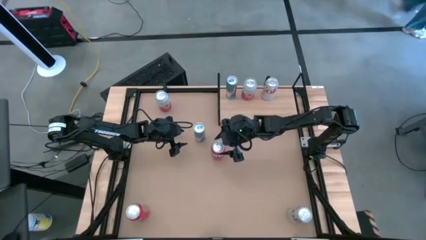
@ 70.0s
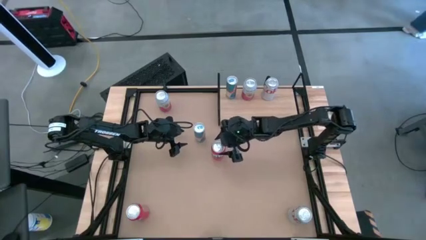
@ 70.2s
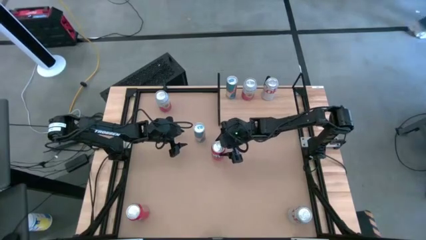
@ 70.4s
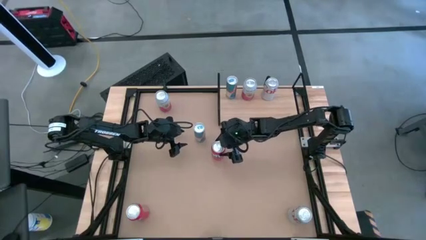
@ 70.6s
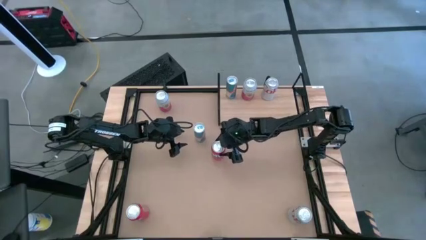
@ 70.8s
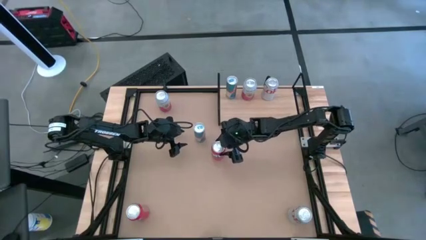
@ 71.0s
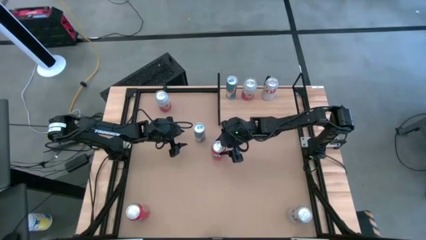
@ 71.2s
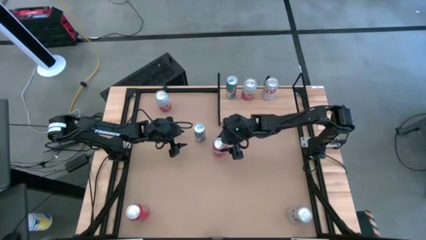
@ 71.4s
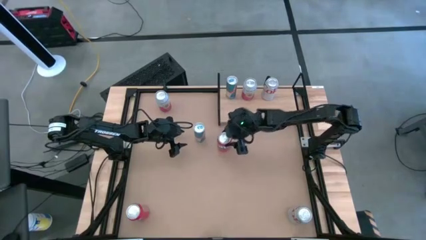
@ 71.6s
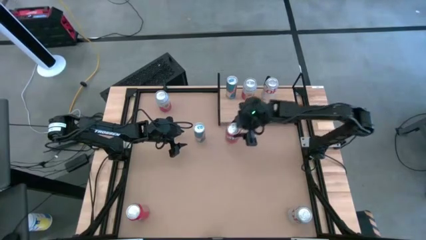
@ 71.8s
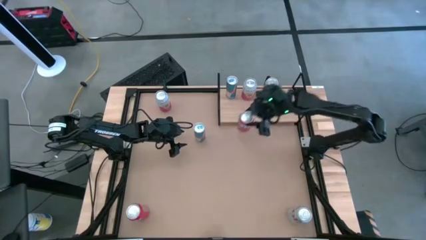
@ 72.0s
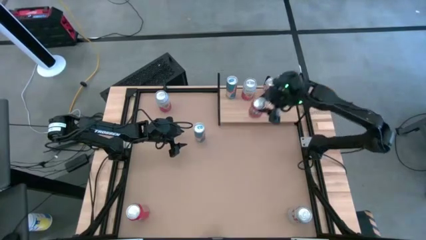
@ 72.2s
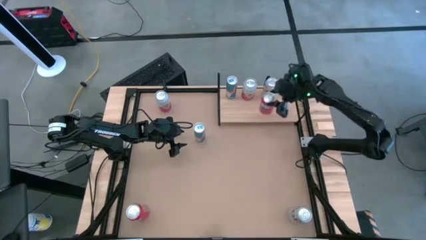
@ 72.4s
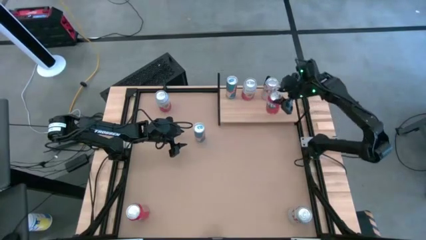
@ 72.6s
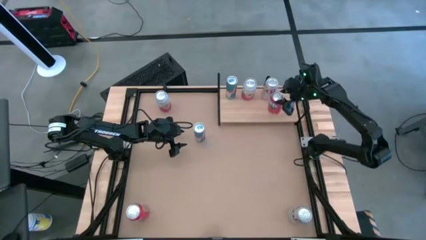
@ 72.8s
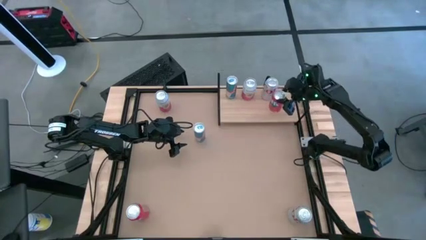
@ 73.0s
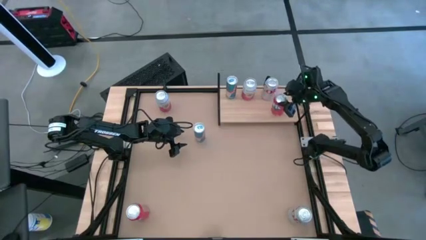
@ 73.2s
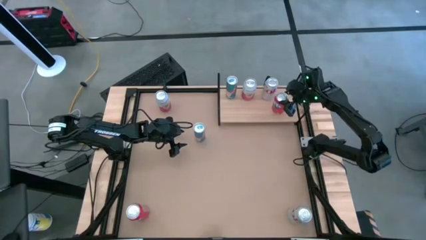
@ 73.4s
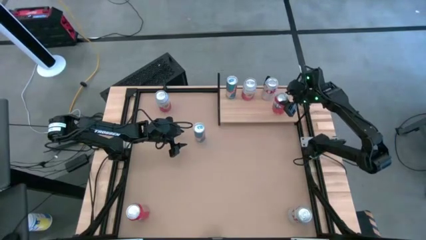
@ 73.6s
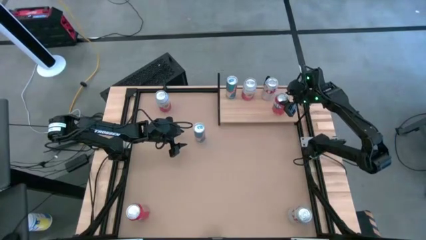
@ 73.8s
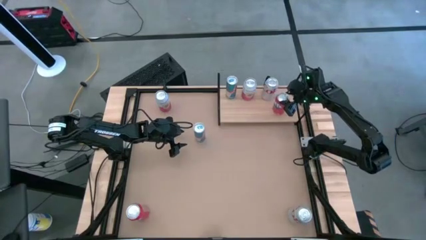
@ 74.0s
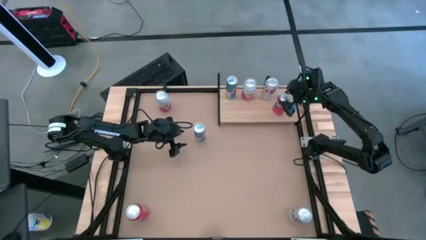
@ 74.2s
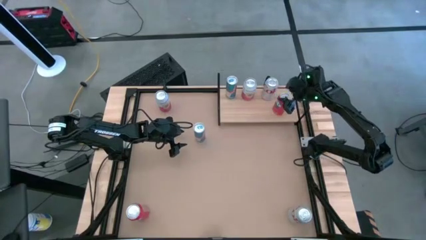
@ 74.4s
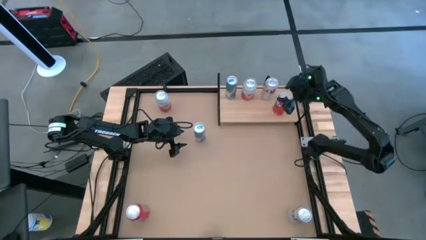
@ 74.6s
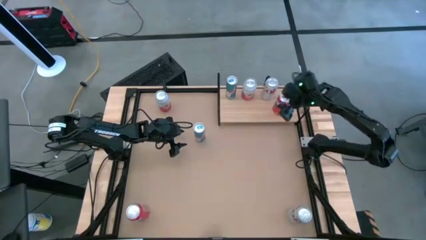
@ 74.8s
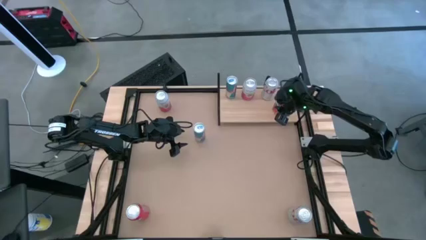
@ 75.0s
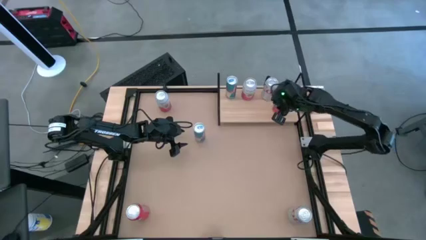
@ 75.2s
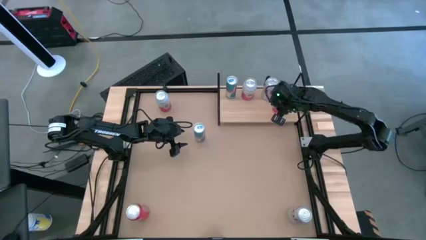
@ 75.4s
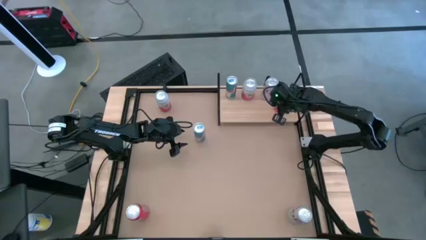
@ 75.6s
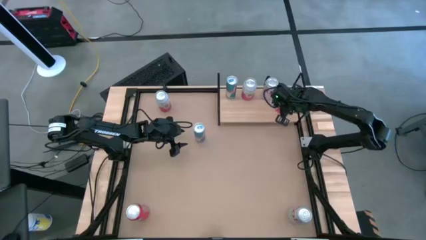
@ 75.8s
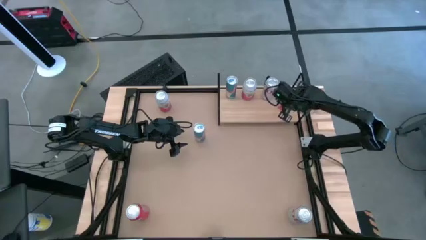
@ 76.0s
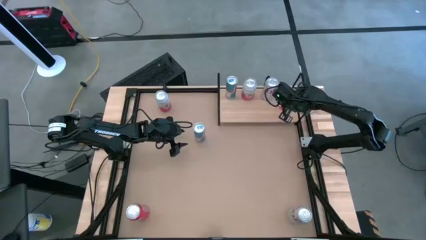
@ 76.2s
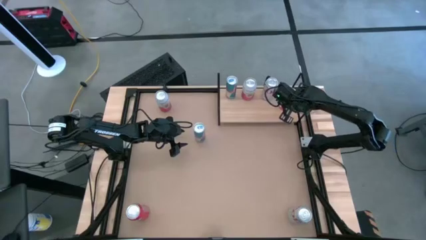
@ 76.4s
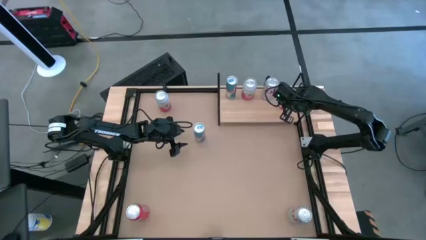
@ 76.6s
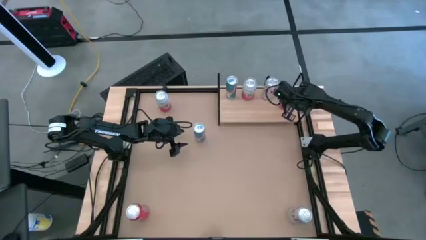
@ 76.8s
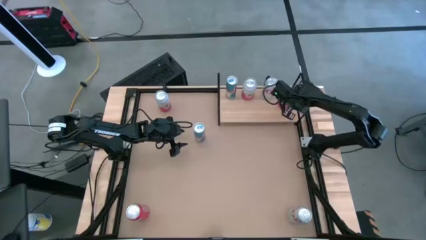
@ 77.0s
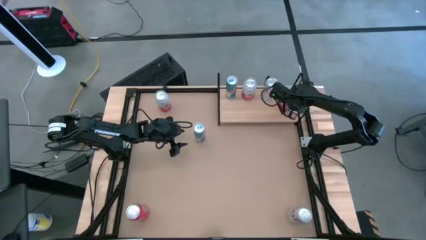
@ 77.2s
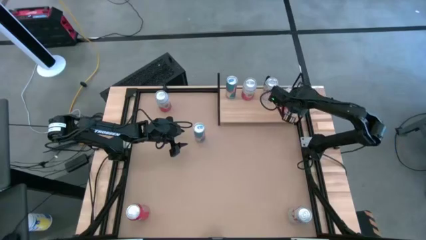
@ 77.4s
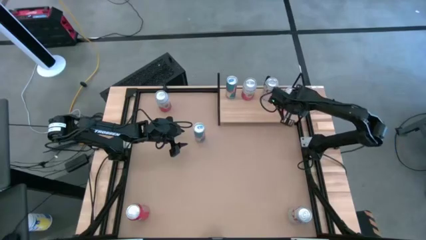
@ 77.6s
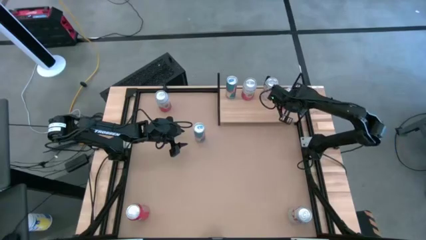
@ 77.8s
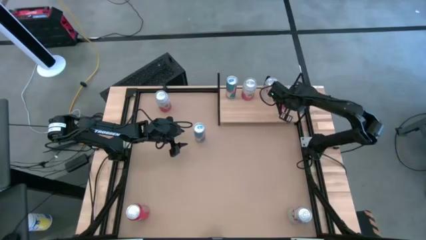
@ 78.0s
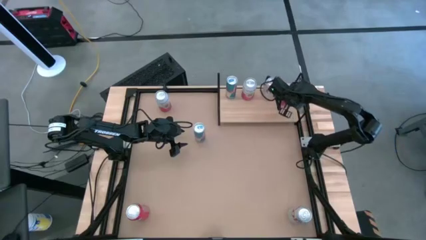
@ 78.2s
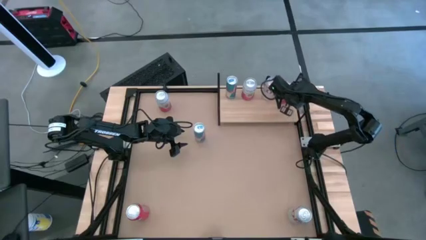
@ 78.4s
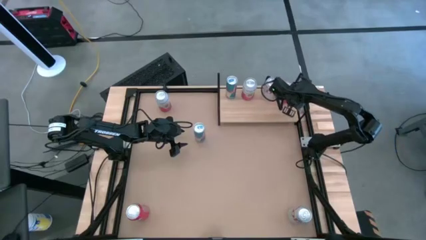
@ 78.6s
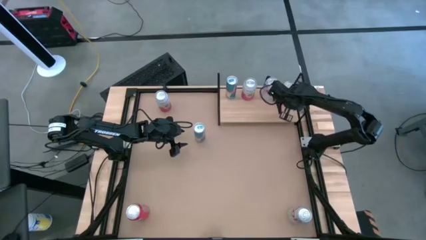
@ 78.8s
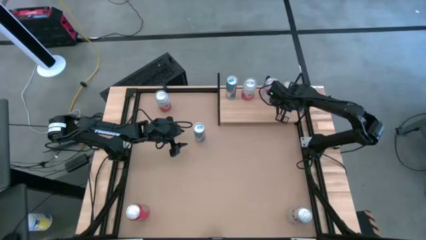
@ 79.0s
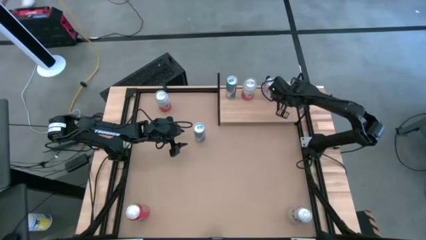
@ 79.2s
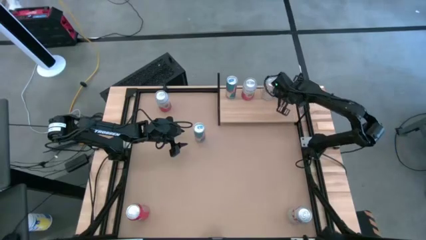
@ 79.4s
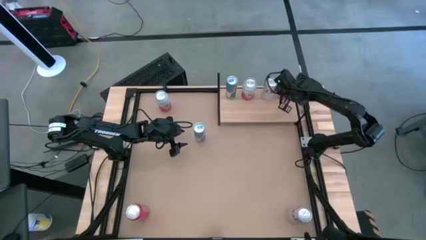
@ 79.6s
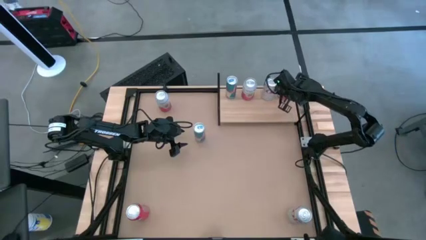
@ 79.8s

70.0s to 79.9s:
Task: Place canned beverage on shelf
Put the top orange soda can on the shelf

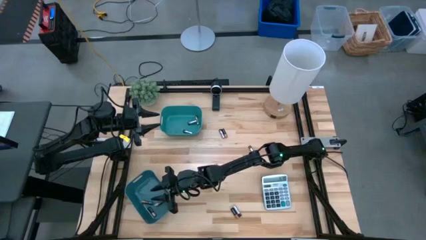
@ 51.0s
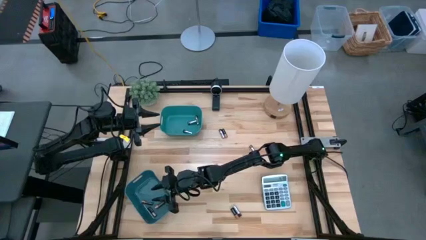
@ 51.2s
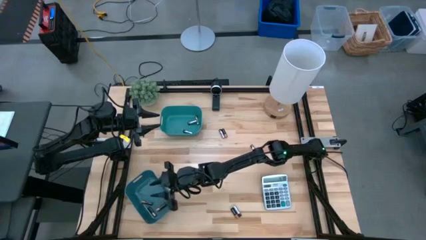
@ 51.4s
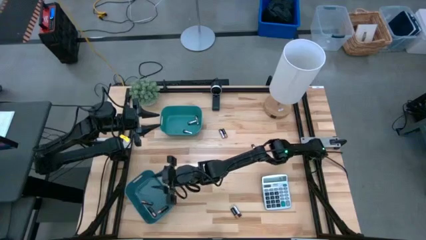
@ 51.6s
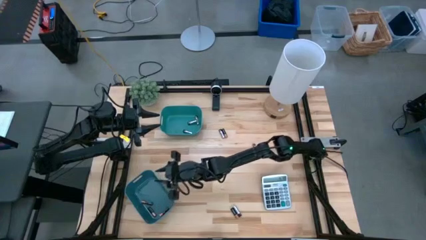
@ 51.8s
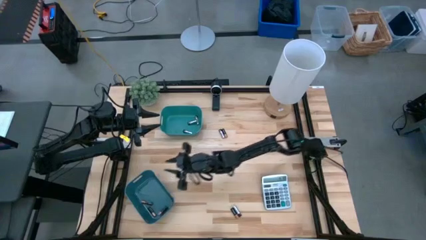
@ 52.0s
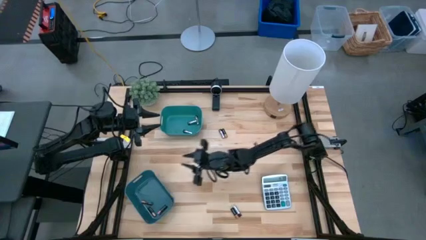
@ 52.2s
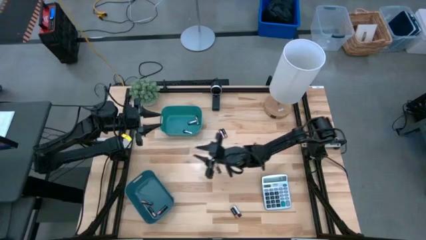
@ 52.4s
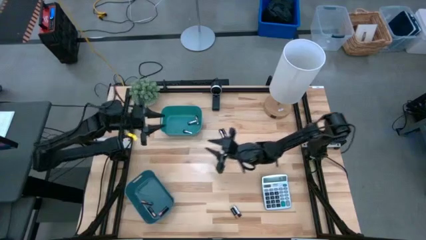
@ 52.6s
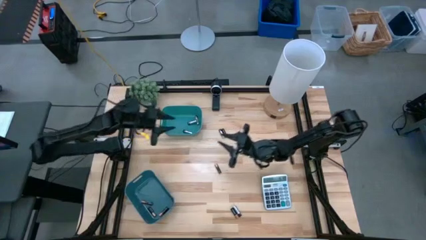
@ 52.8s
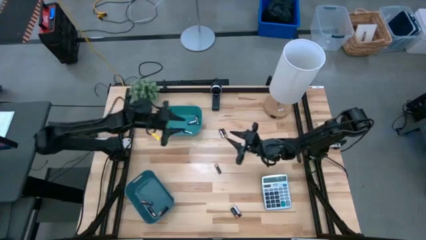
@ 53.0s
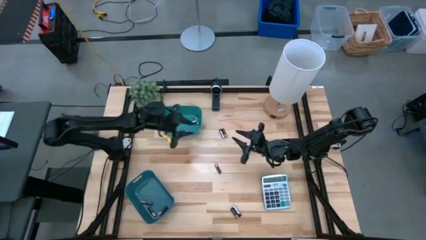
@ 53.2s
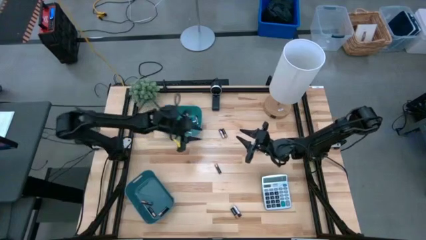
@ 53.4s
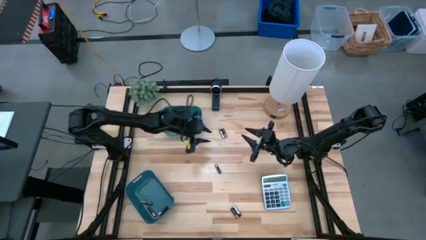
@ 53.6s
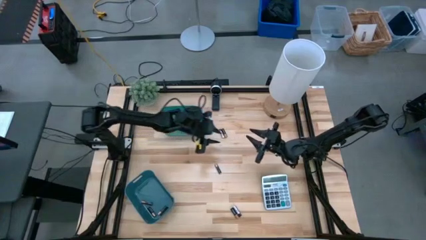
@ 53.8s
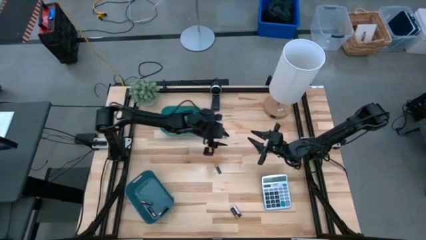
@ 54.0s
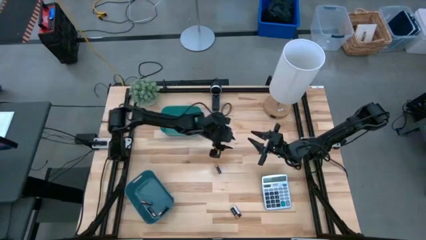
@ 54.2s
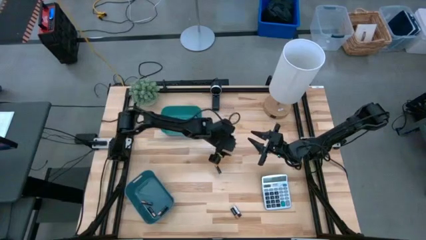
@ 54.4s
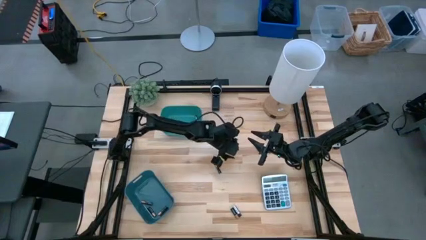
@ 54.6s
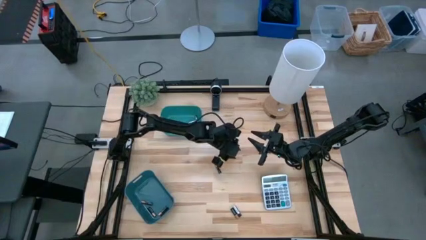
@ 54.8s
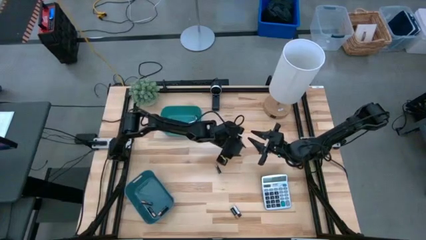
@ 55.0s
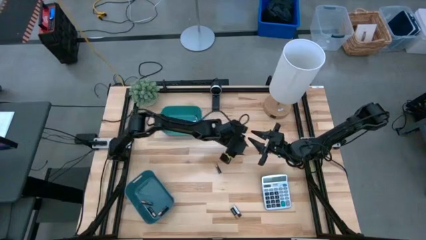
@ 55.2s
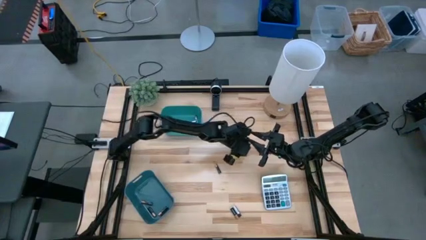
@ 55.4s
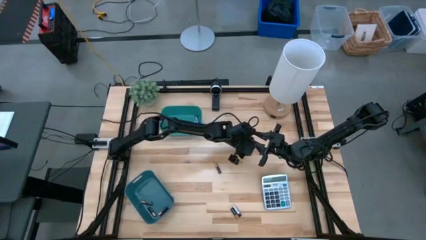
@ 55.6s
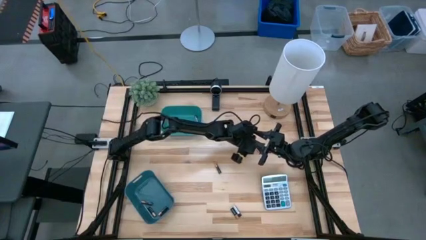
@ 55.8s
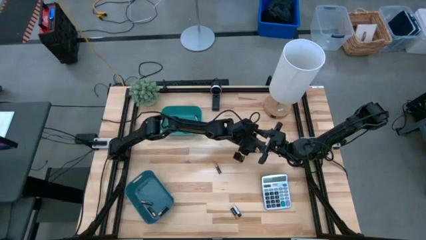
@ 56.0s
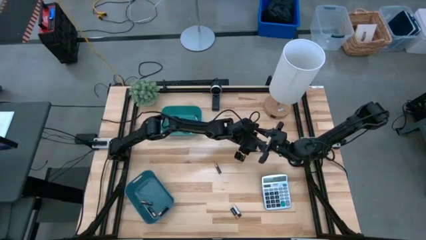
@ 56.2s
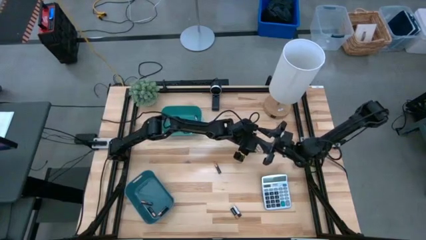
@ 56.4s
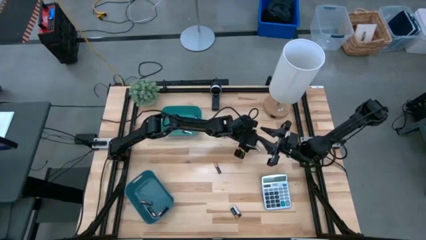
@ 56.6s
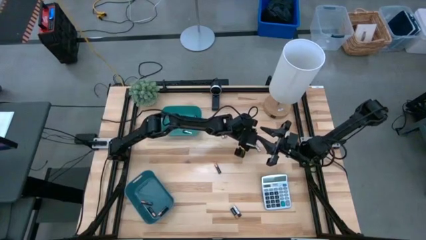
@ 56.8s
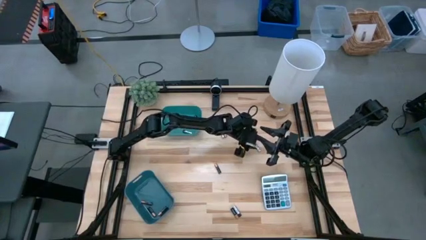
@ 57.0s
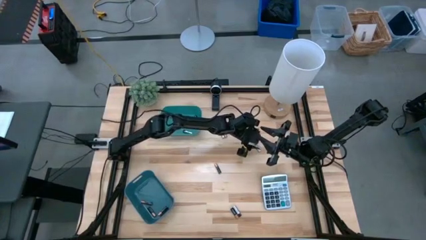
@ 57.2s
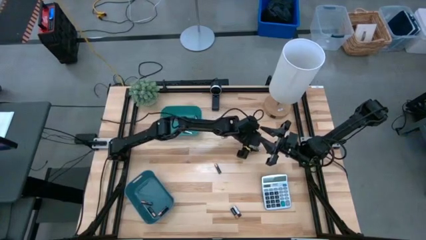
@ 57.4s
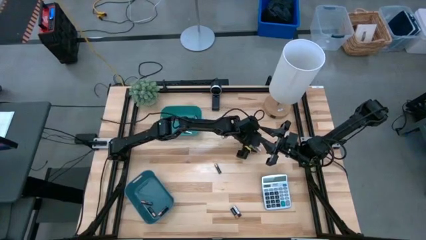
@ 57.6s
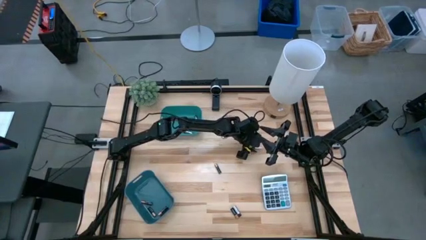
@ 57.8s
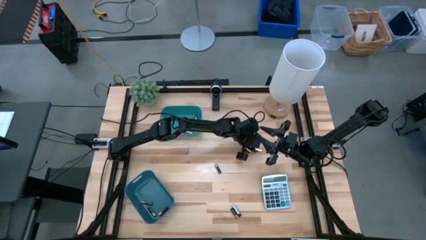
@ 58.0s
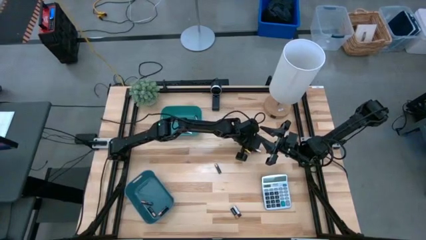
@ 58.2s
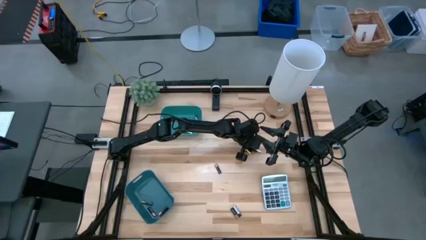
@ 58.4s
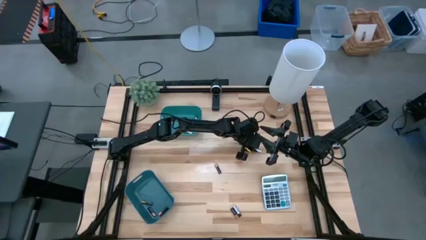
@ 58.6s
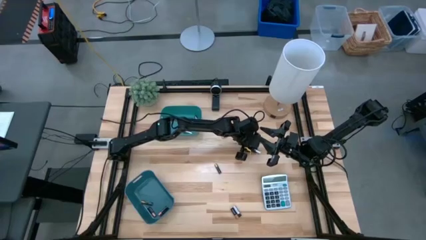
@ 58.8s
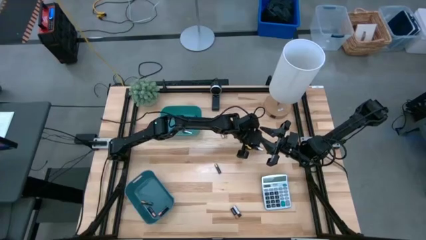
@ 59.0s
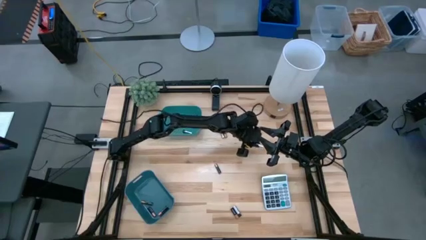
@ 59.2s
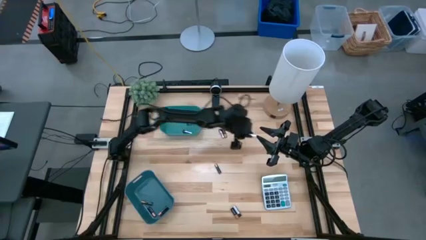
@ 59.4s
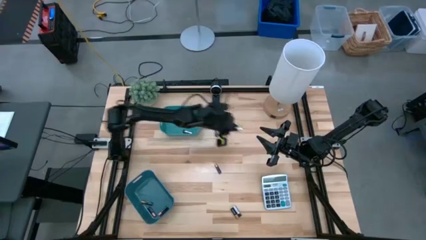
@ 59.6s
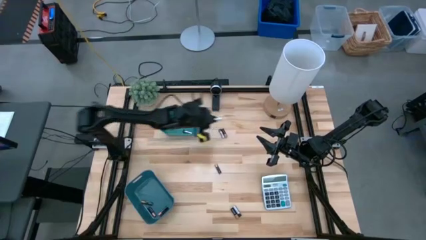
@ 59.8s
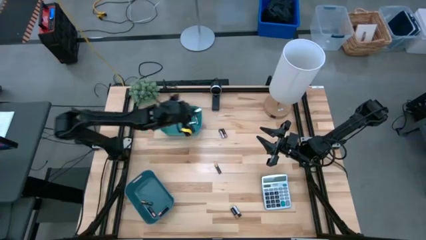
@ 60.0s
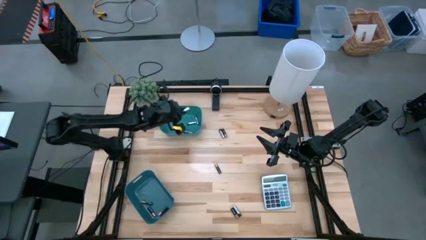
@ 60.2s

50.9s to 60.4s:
Task: Sort batteries
Put the middle silver battery into the green bin
